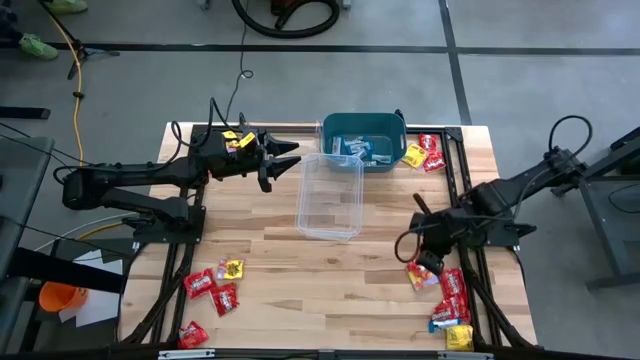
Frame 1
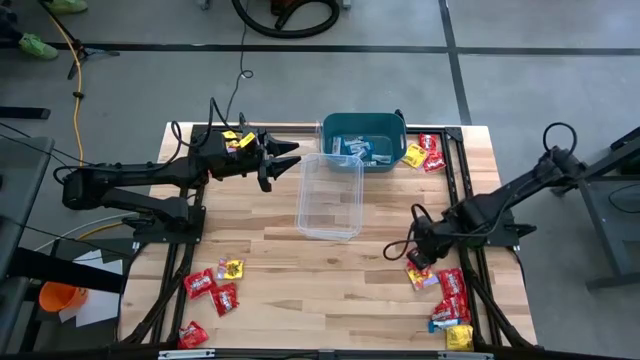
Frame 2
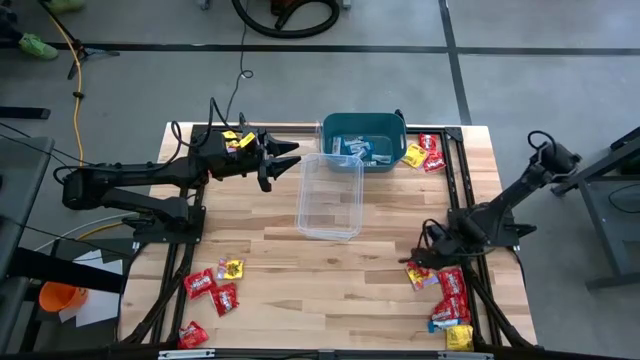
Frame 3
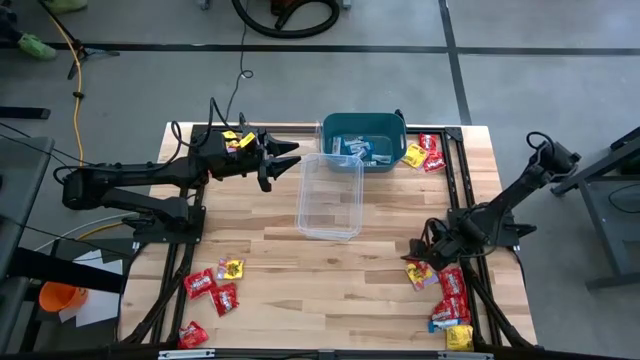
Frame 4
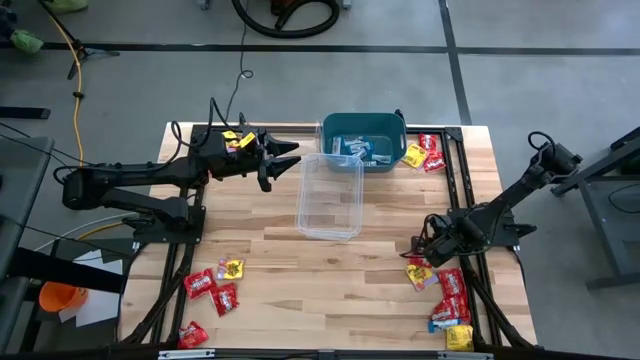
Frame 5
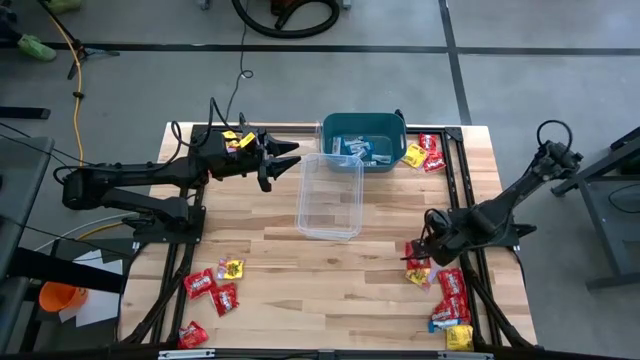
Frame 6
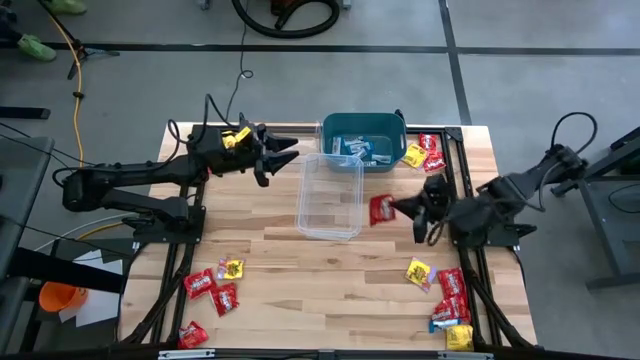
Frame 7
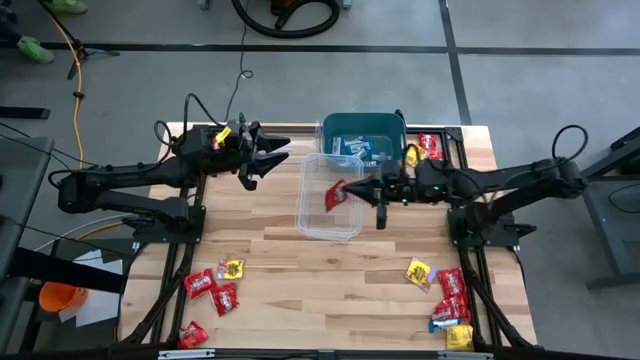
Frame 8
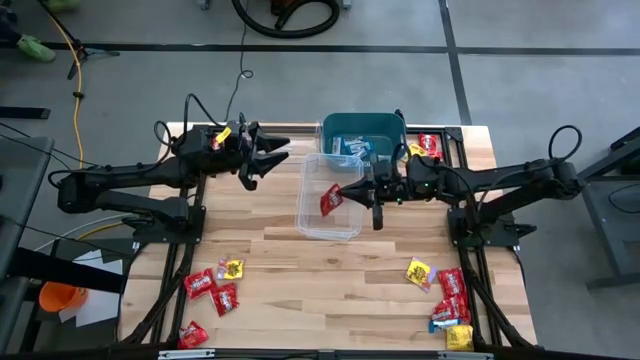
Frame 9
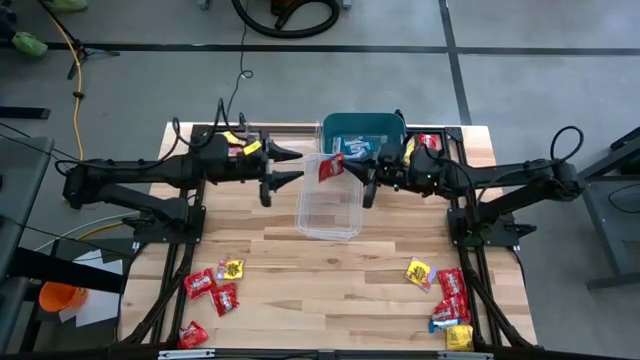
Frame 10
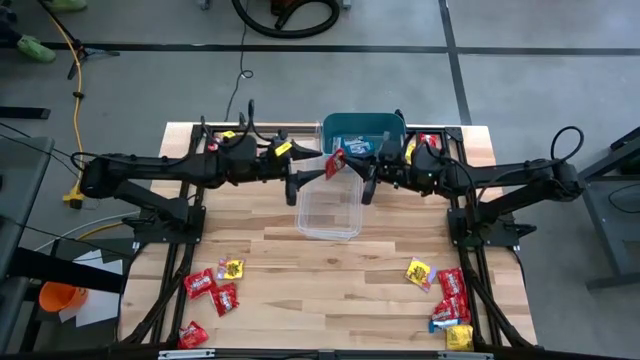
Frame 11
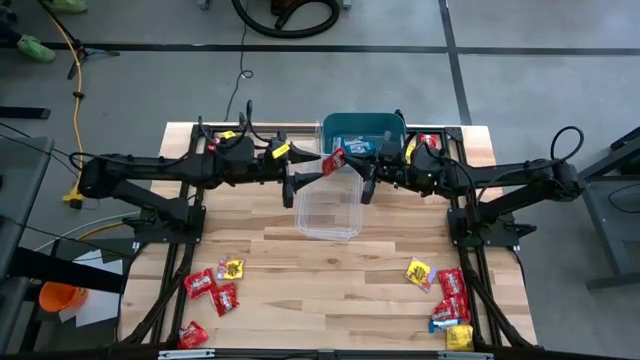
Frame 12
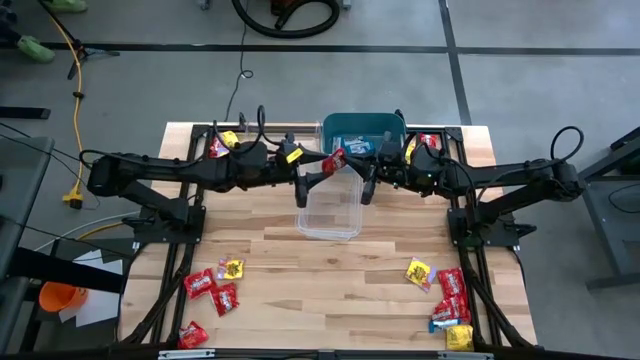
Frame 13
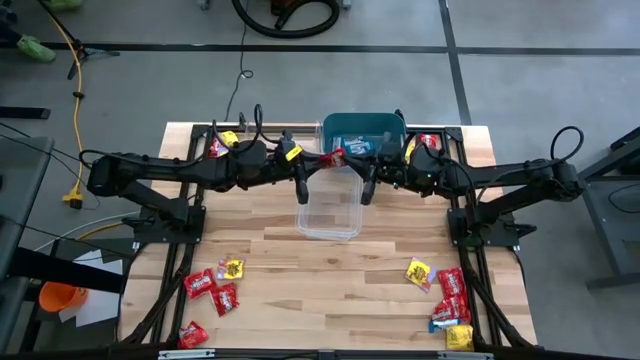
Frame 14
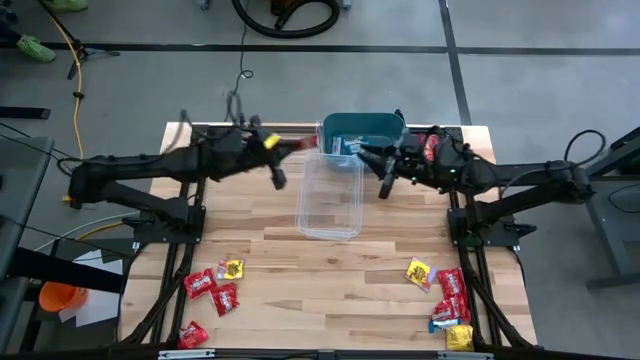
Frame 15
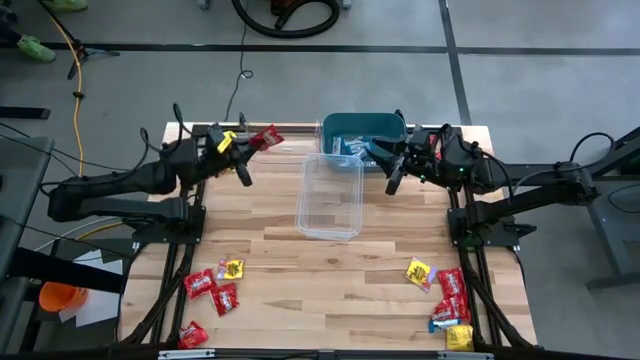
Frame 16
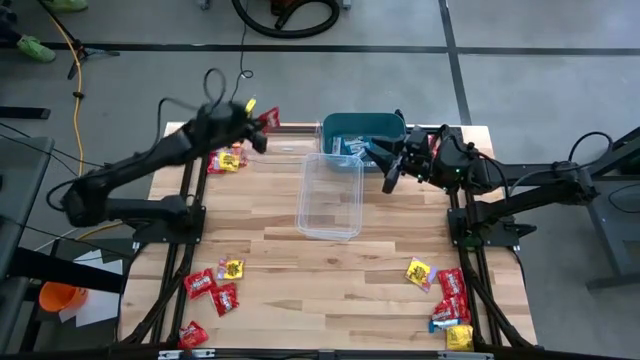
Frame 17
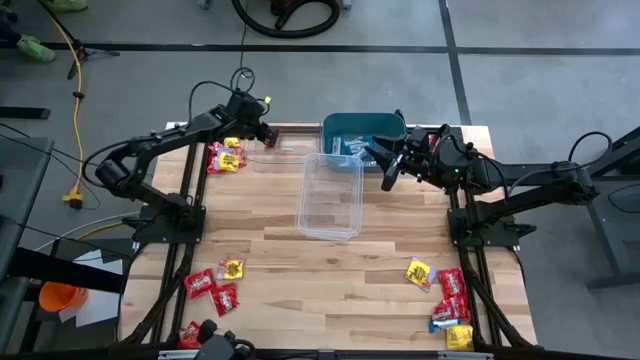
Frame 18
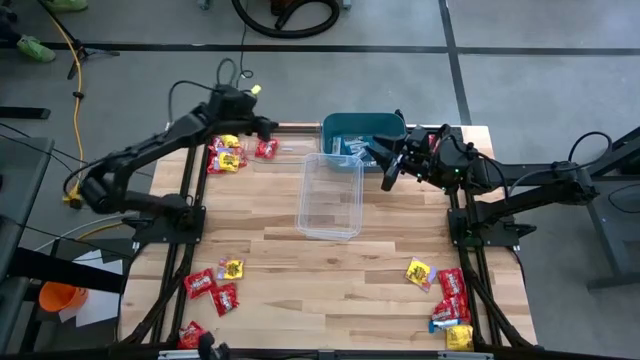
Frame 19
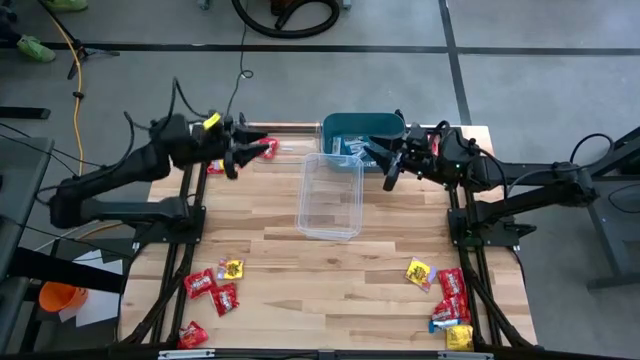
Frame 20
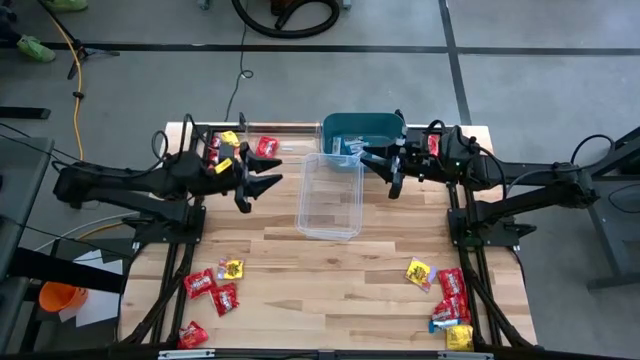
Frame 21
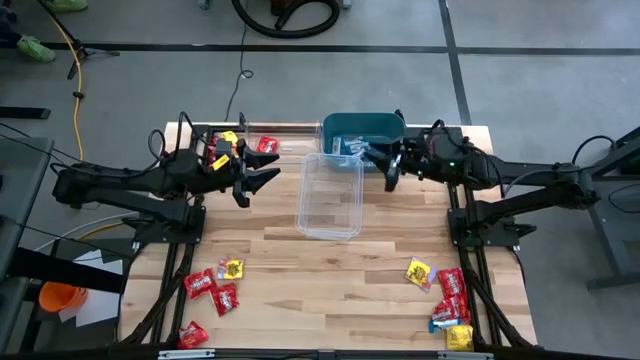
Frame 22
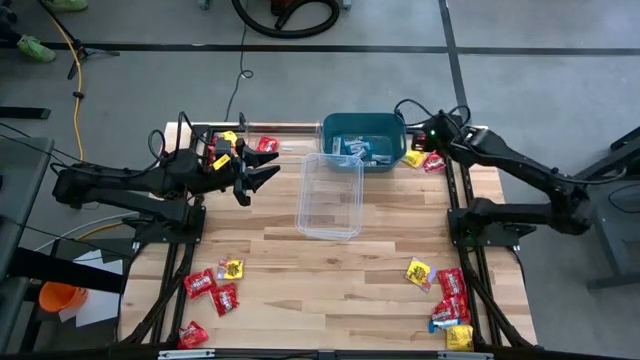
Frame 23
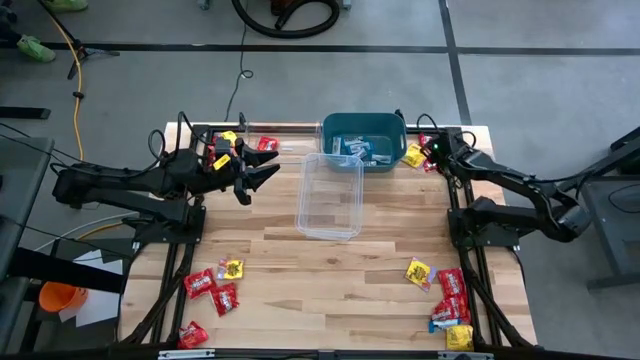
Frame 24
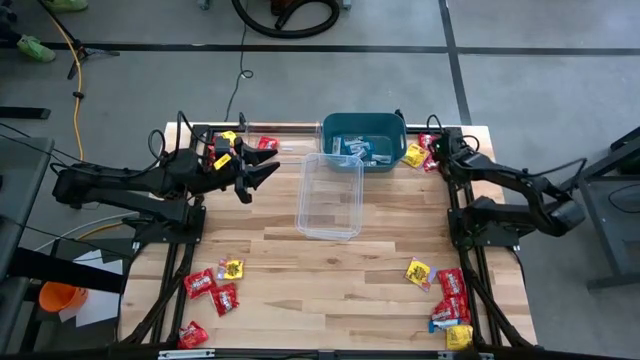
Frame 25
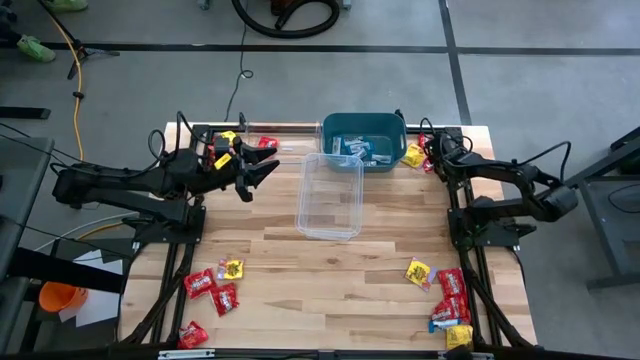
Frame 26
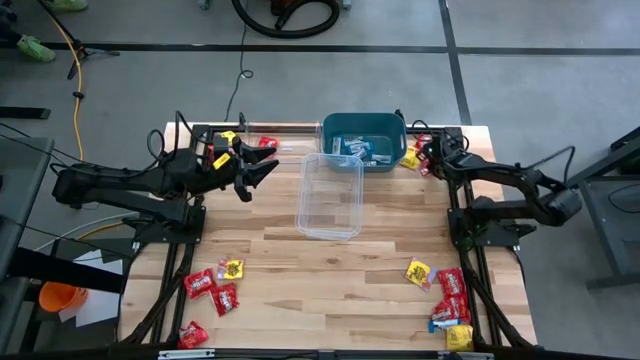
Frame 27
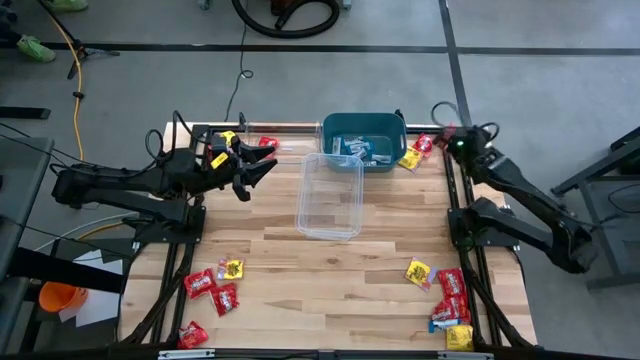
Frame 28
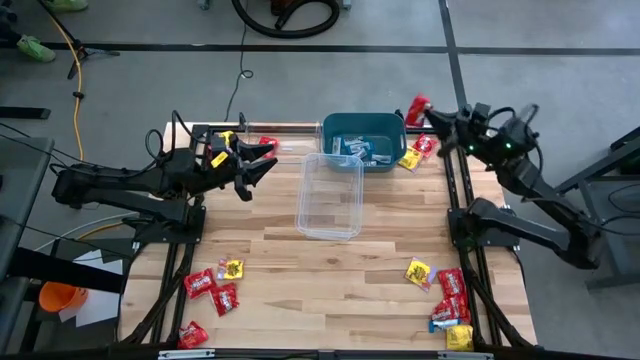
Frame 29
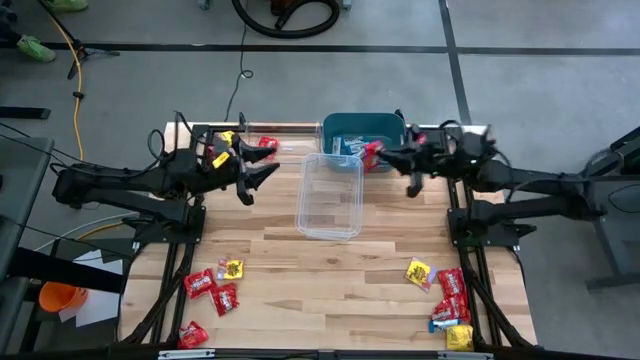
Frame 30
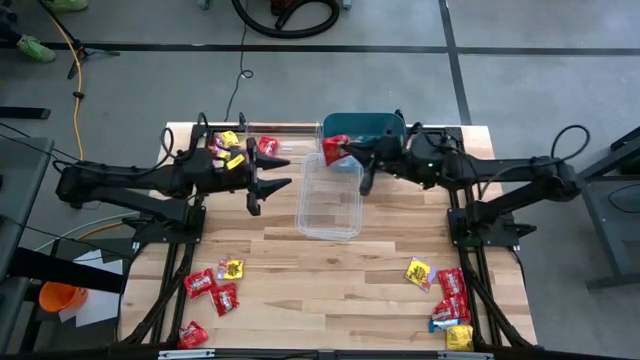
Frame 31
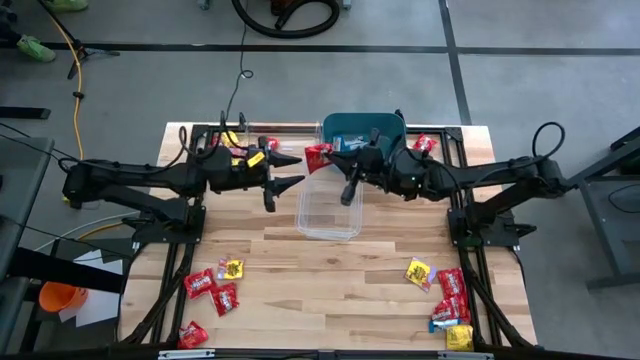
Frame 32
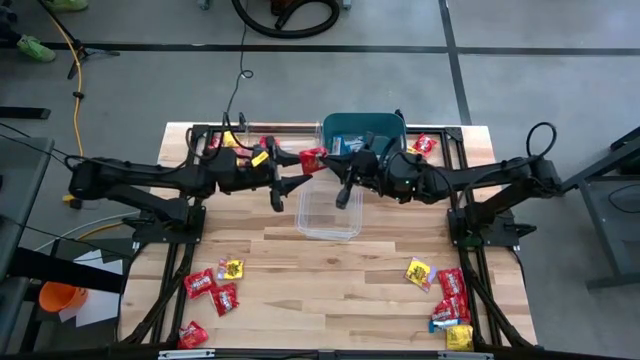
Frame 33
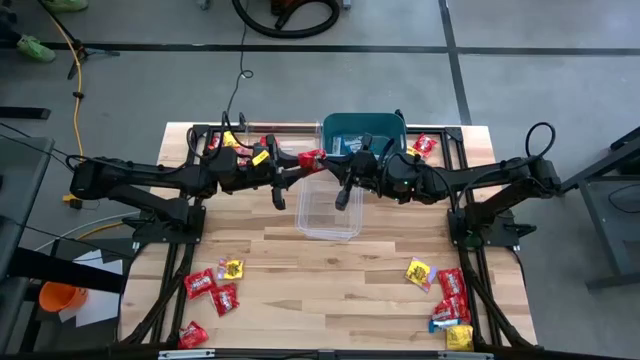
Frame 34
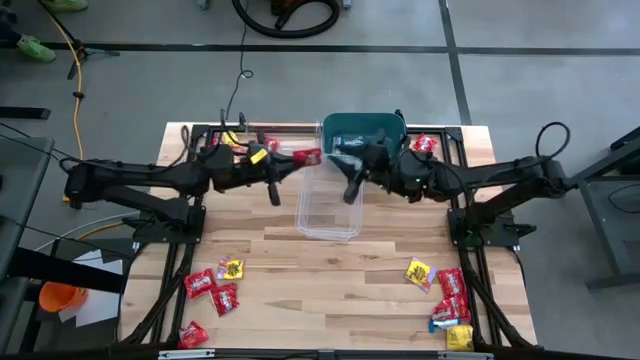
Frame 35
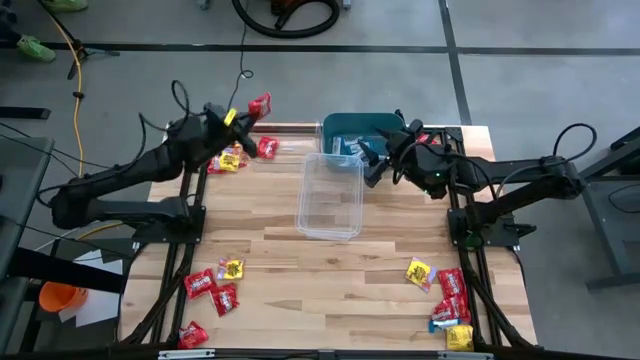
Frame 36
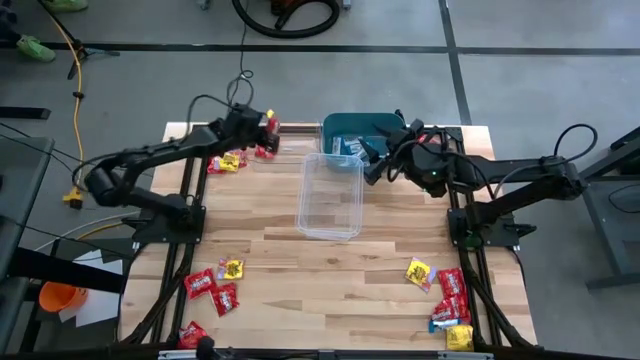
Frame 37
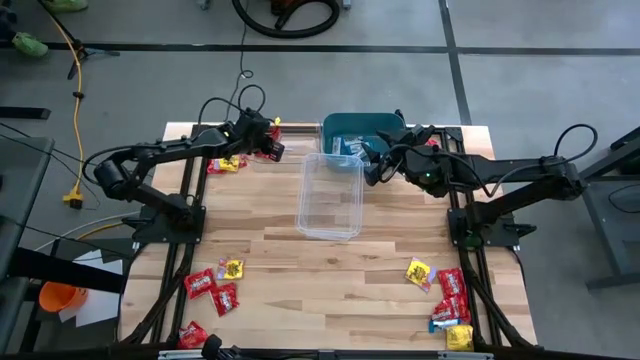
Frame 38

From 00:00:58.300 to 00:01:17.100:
Task: Sort candy
Put the red candy into the transparent bin

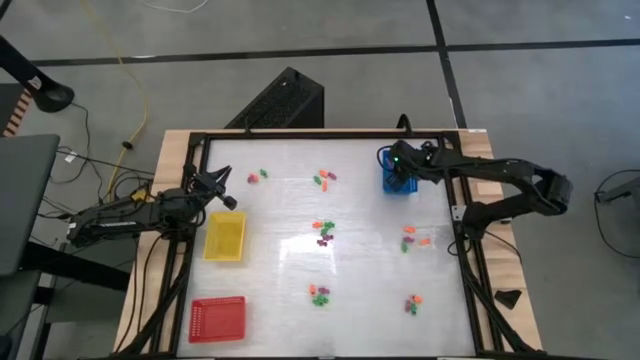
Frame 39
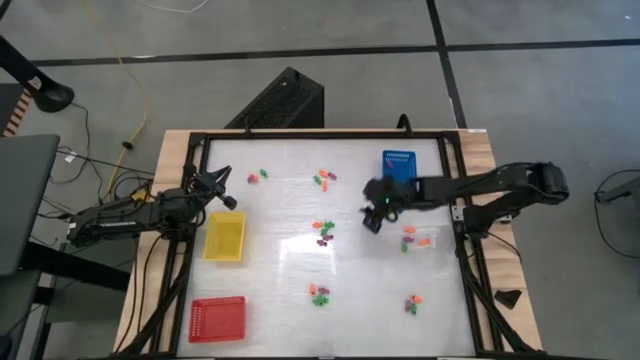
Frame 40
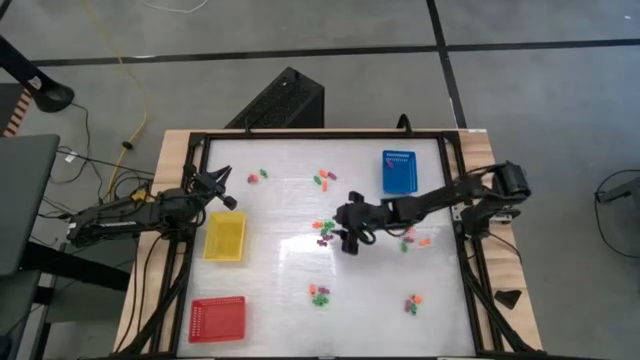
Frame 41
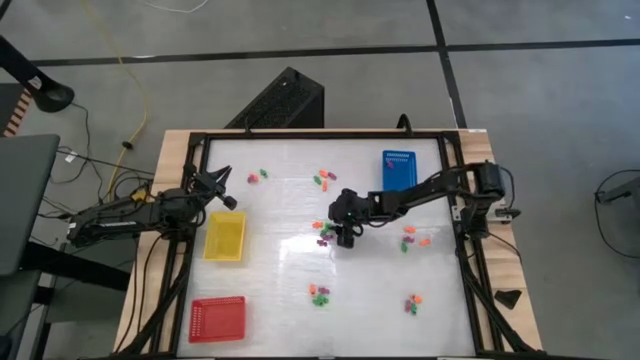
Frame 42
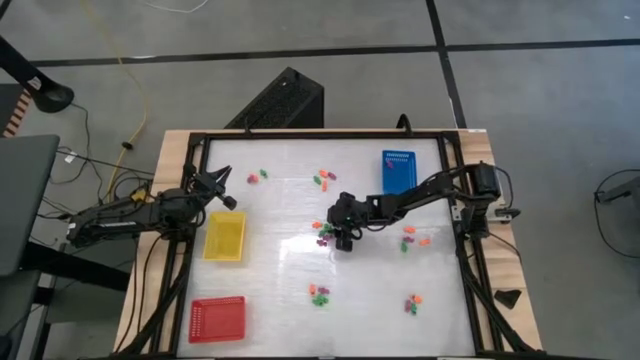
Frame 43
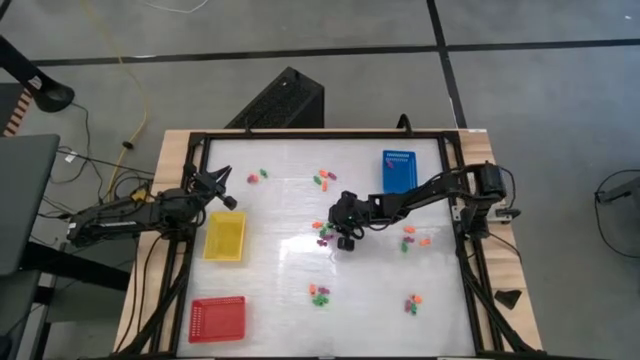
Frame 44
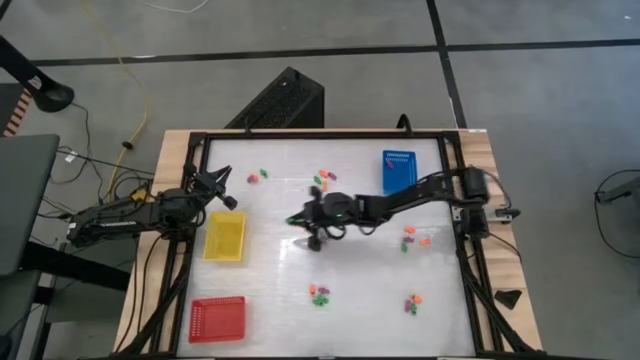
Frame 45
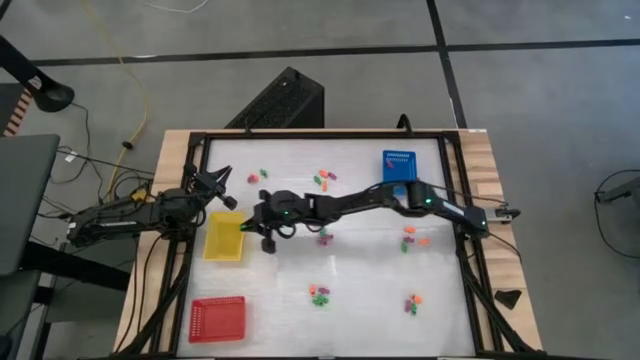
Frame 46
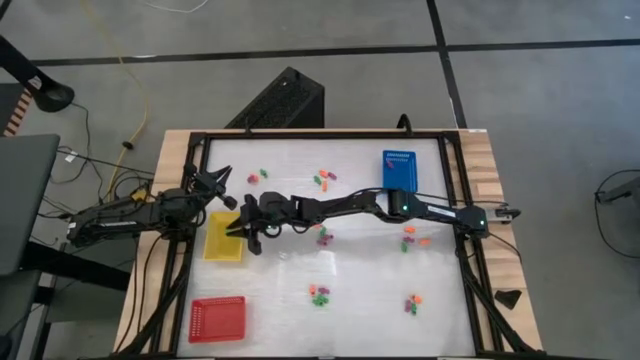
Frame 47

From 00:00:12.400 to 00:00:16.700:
Task: Sort Halloween decoration
Put the green skeleton toy into the yellow bin
